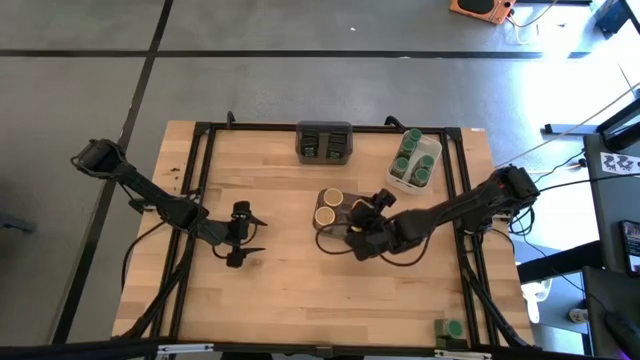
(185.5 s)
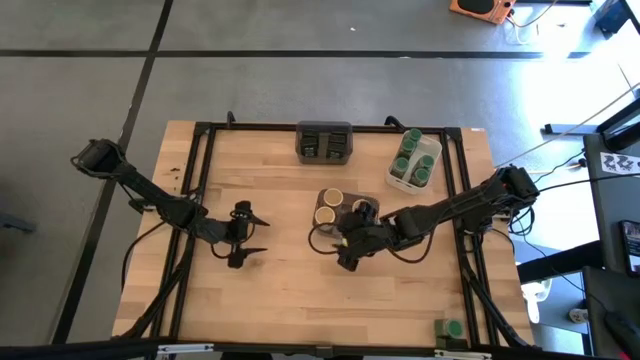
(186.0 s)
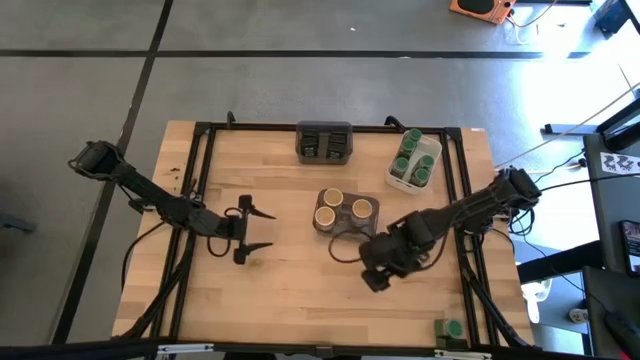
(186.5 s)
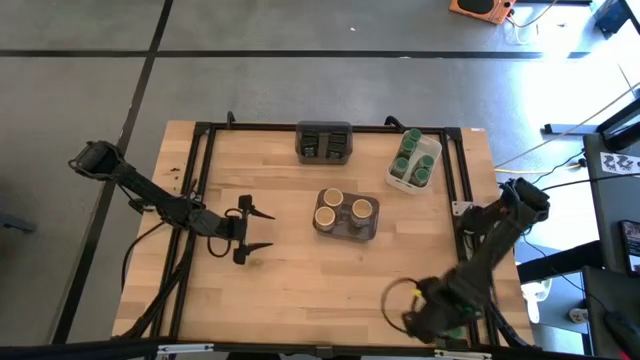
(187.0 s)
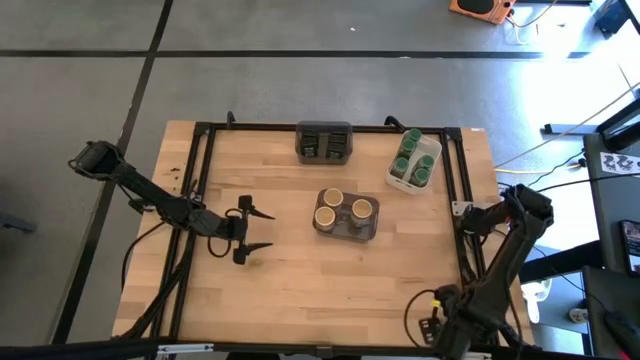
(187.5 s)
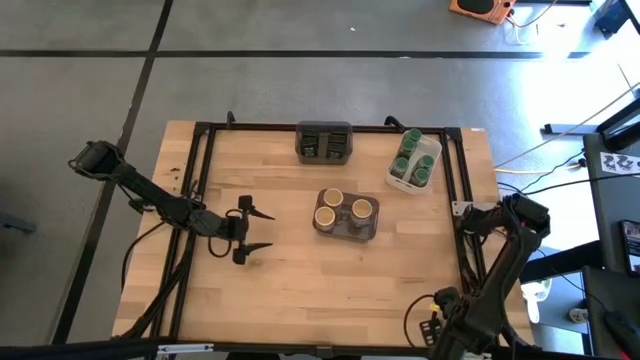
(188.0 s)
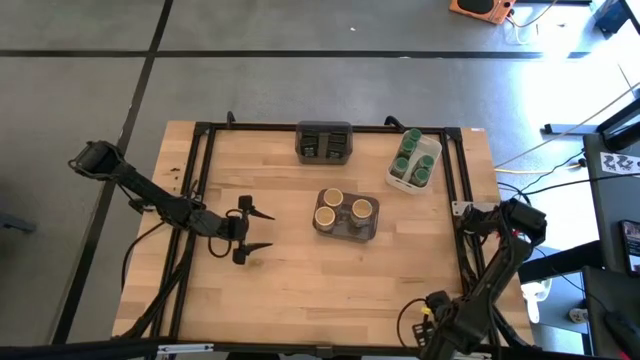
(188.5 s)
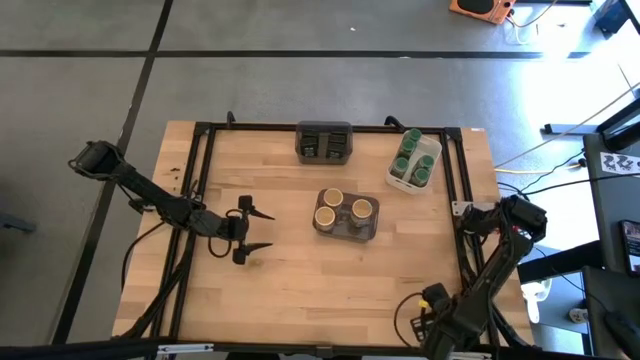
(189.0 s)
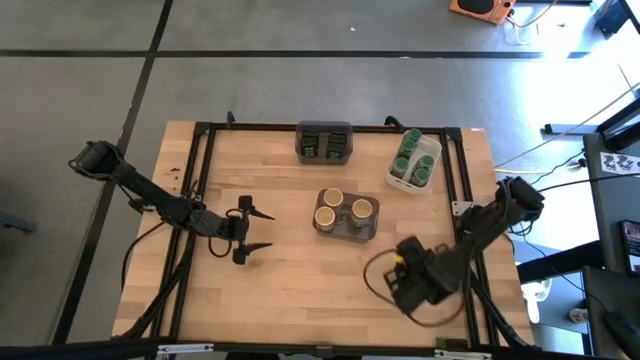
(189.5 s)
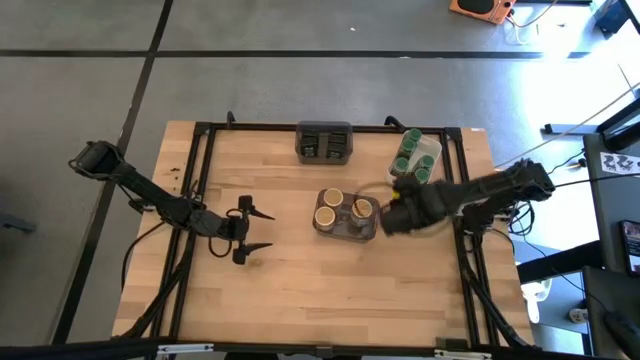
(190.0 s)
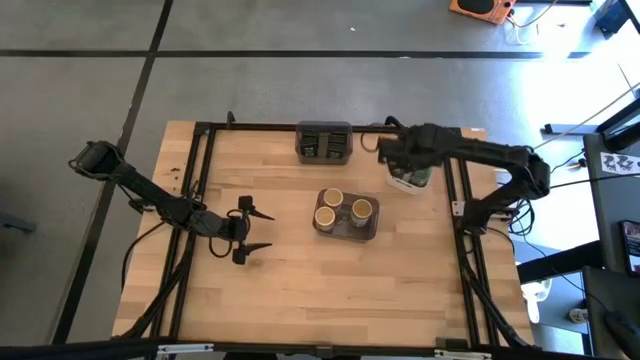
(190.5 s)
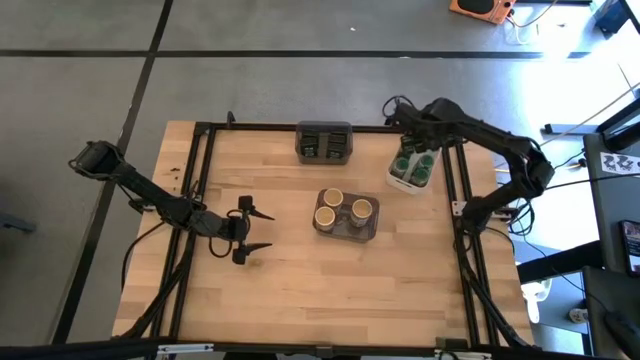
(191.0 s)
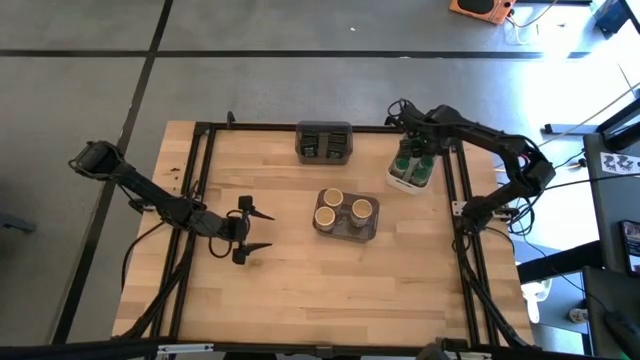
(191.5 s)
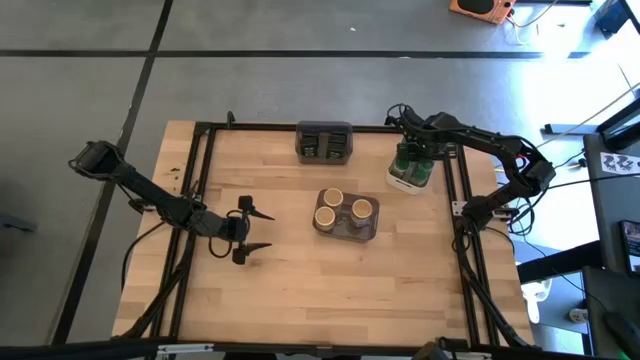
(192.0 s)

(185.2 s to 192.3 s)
Task: Sort spices by type
Put the green seasoning bottle into the white bin

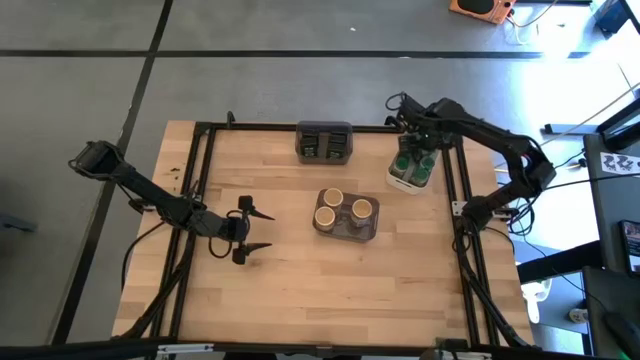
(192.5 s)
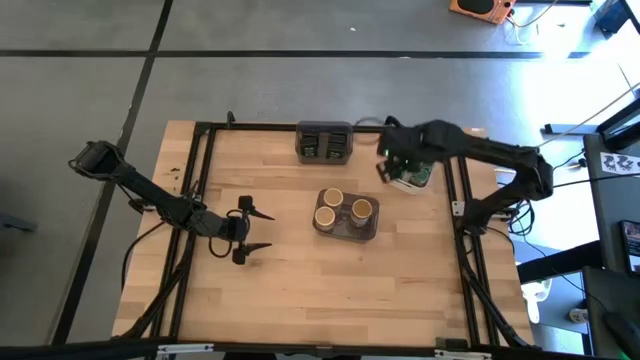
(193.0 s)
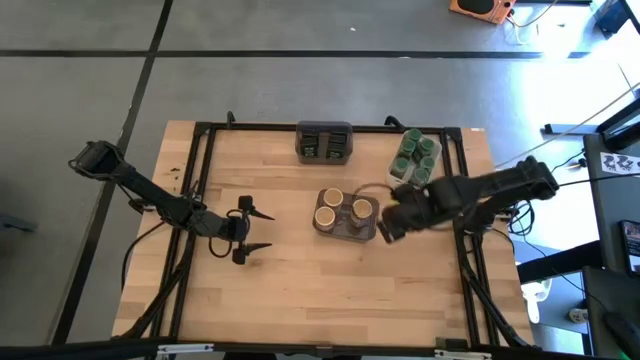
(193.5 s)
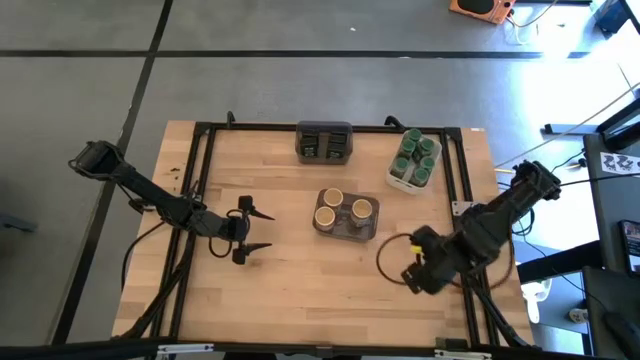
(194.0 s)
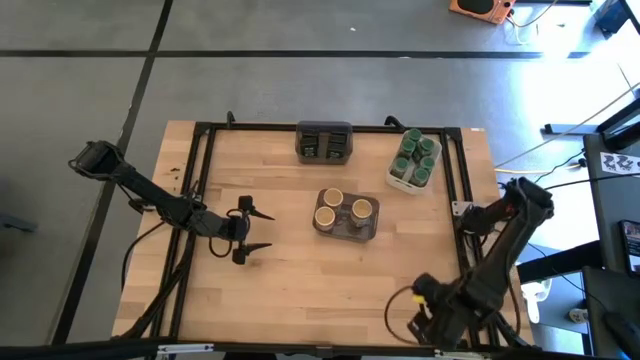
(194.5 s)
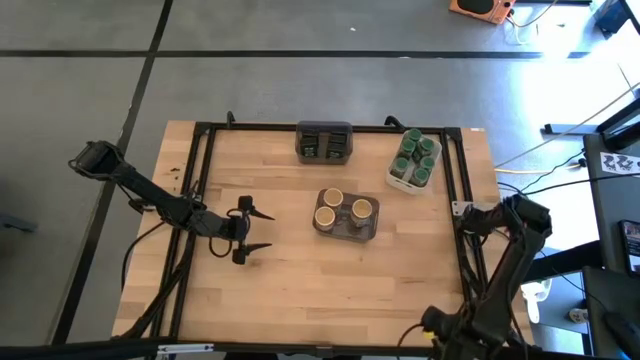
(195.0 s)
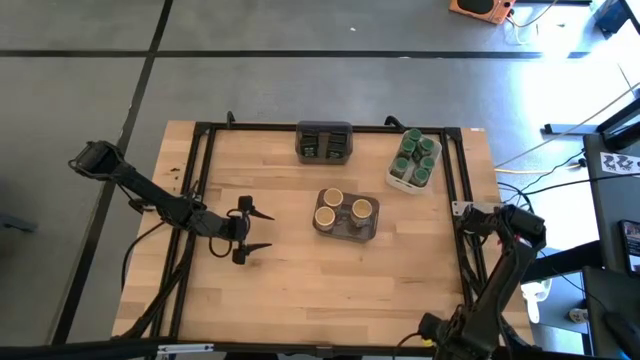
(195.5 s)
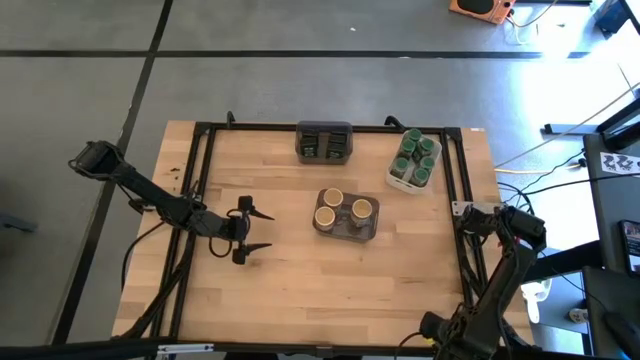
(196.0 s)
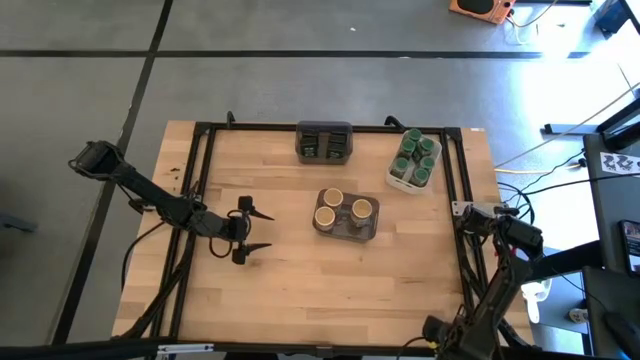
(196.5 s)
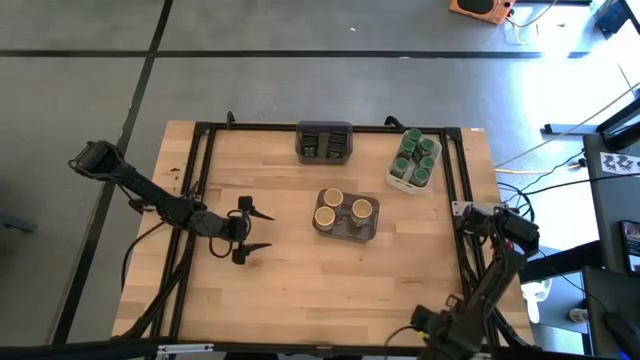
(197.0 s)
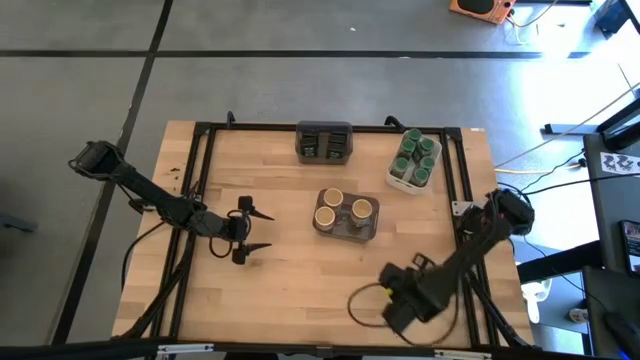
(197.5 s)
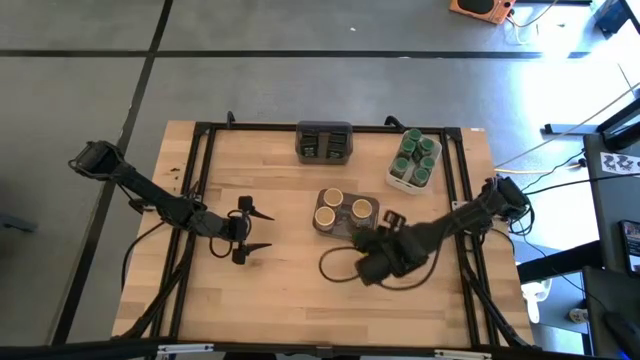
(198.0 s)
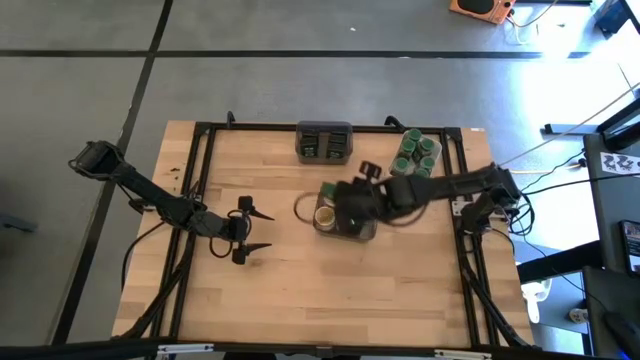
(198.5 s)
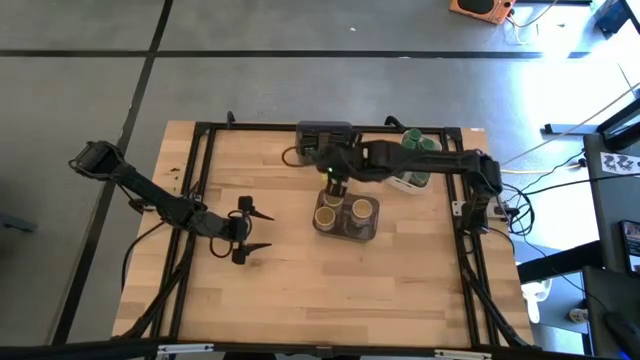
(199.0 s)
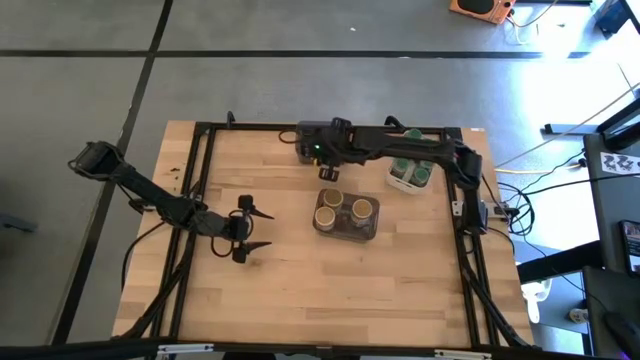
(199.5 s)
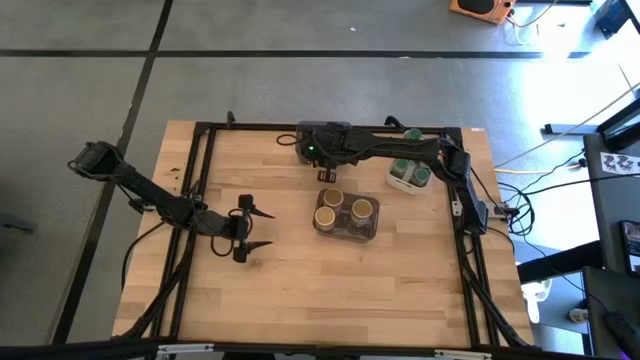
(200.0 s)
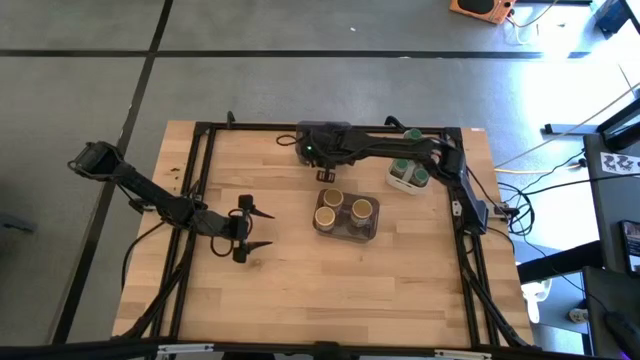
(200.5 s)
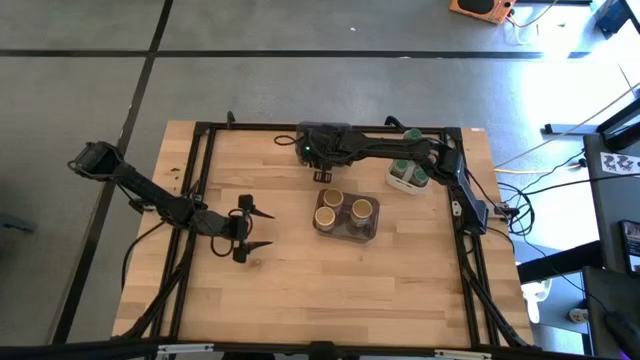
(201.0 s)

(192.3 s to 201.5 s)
Put the black seasoning can into the top black bin

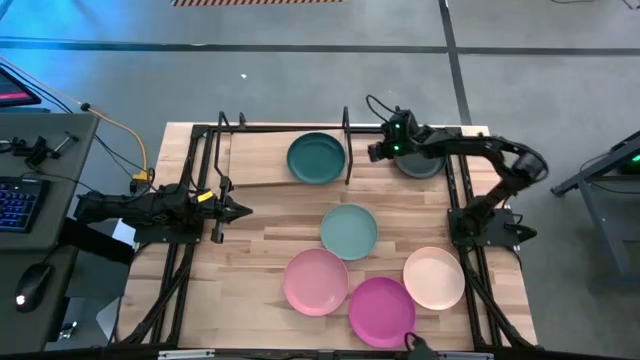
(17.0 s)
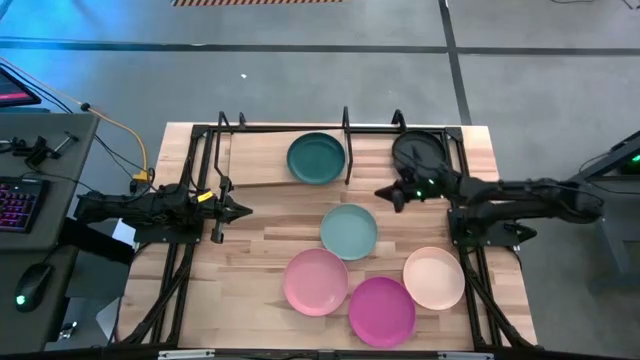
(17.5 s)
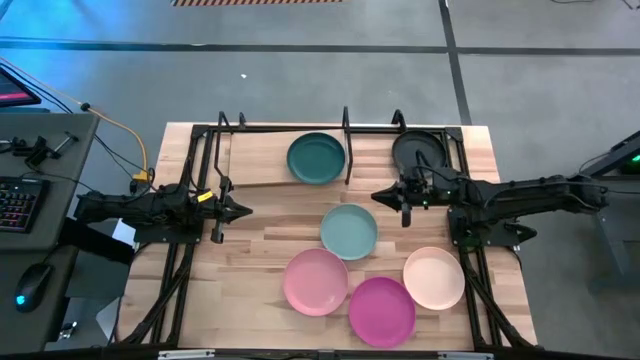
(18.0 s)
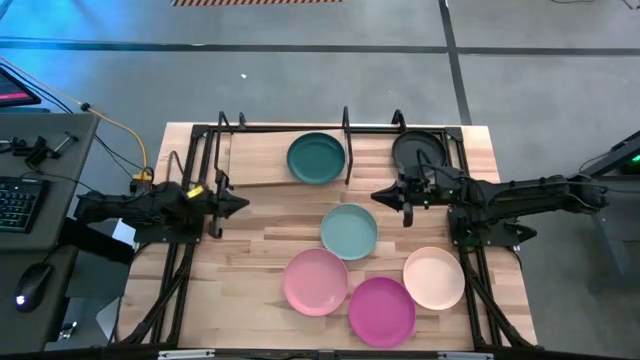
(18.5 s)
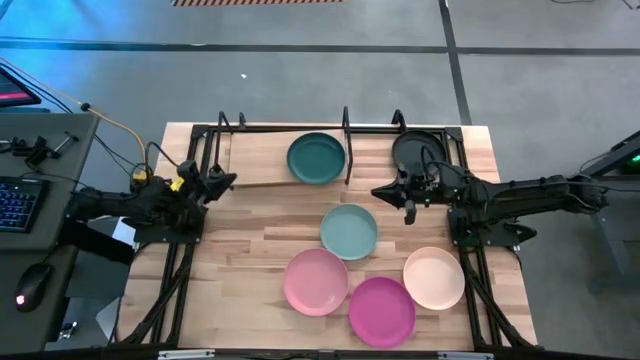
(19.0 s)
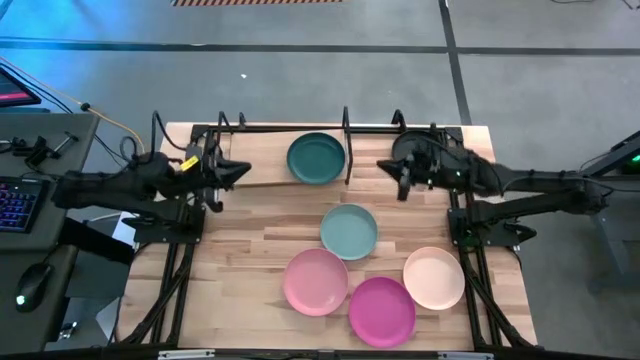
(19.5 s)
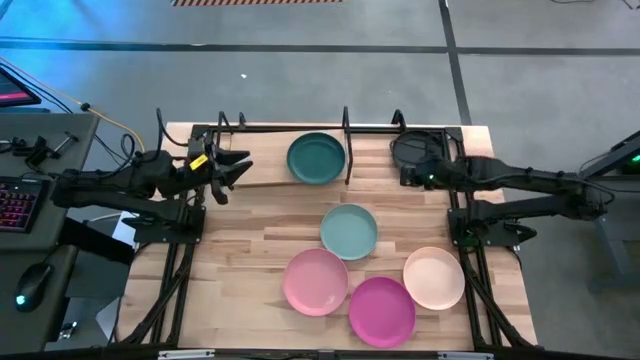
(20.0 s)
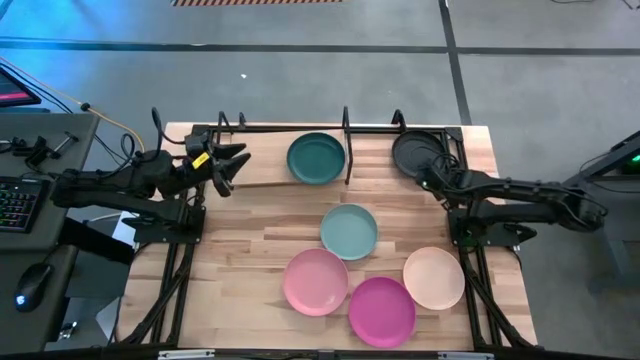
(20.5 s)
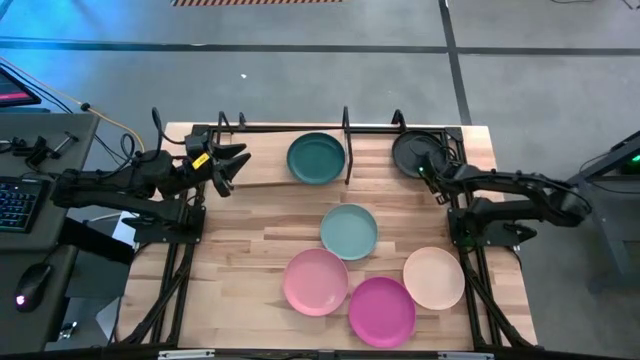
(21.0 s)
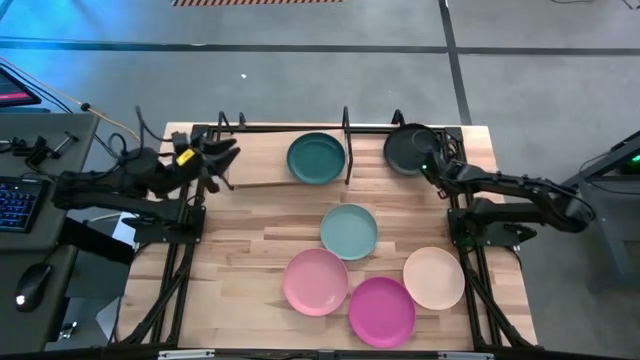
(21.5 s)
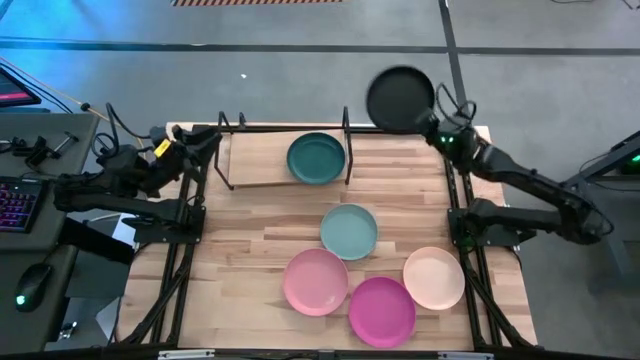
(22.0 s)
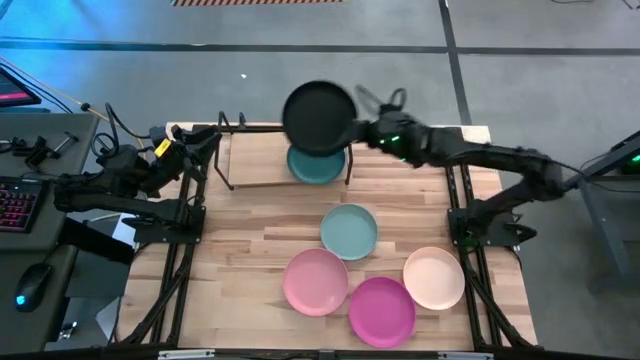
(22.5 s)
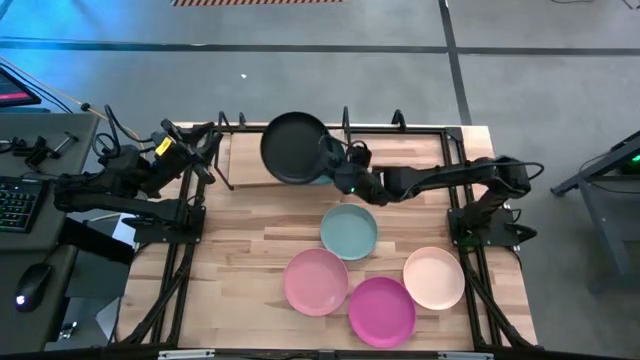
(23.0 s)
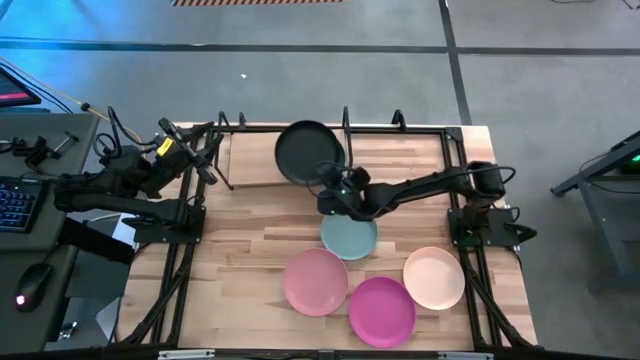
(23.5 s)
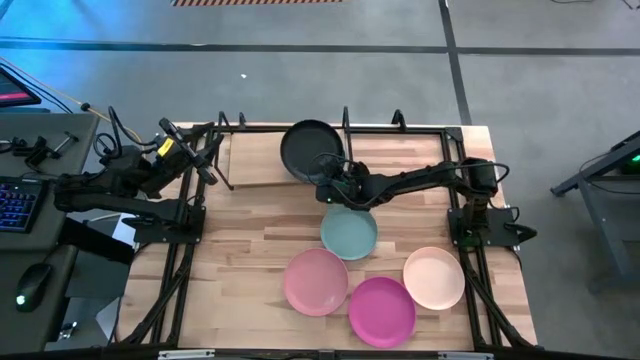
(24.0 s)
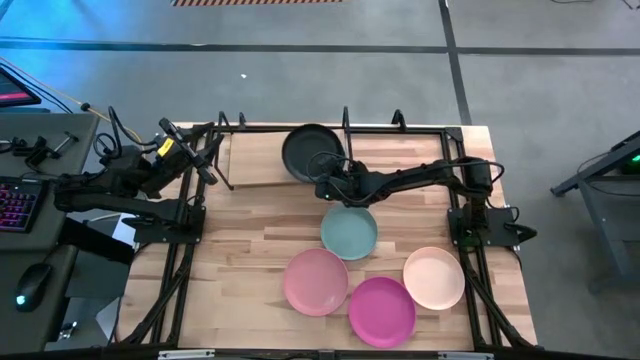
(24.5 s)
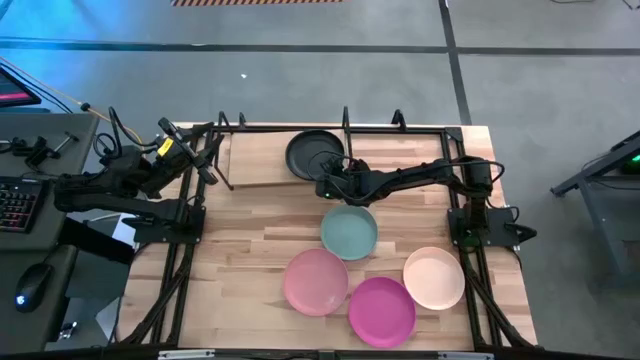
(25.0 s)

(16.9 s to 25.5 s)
Task: Place and stack plates onto a shelf
Stack the black plate on top of the dark green plate on the shelf
